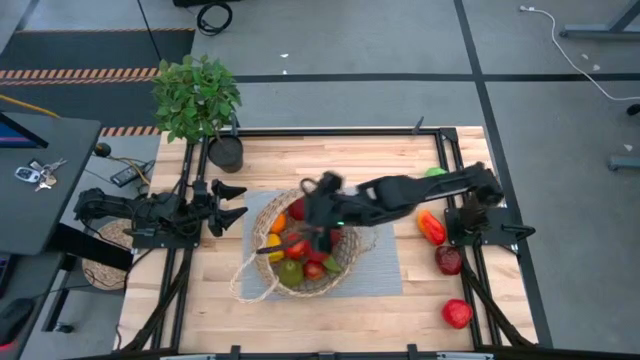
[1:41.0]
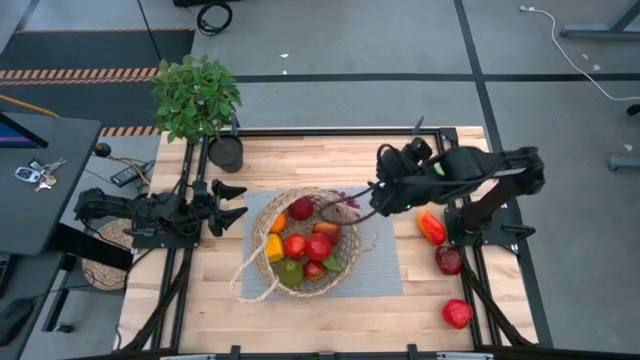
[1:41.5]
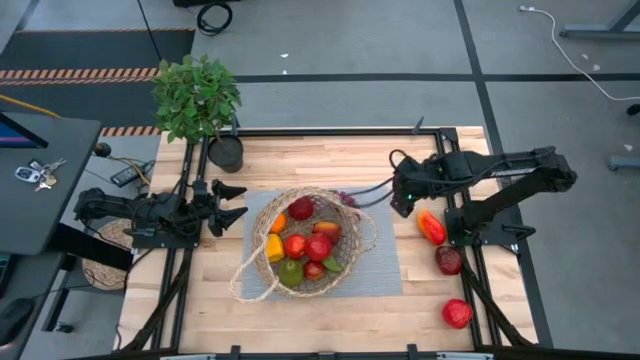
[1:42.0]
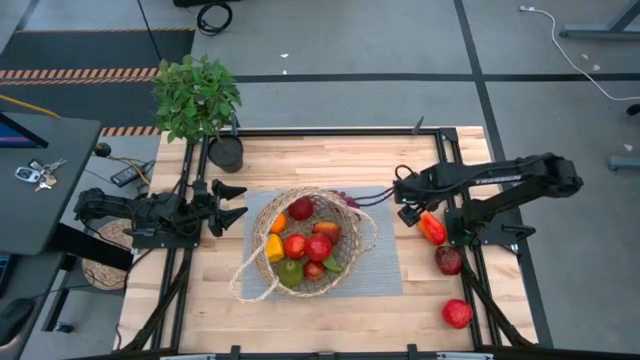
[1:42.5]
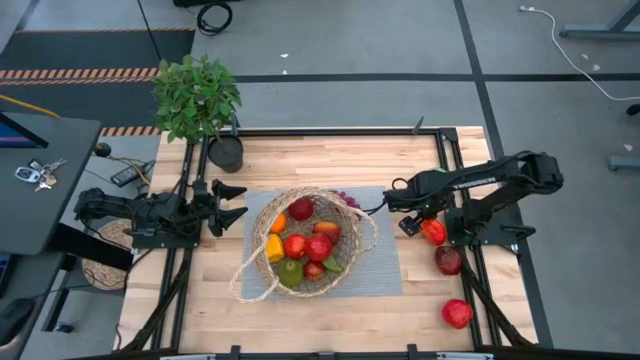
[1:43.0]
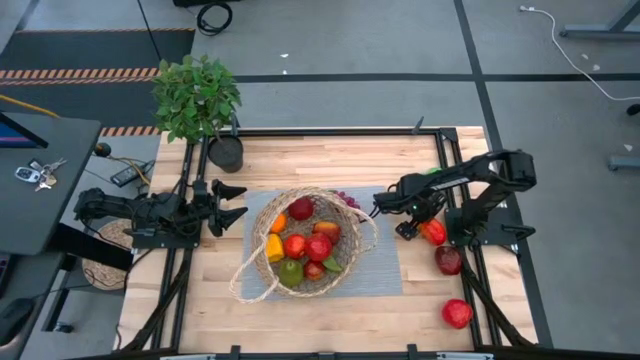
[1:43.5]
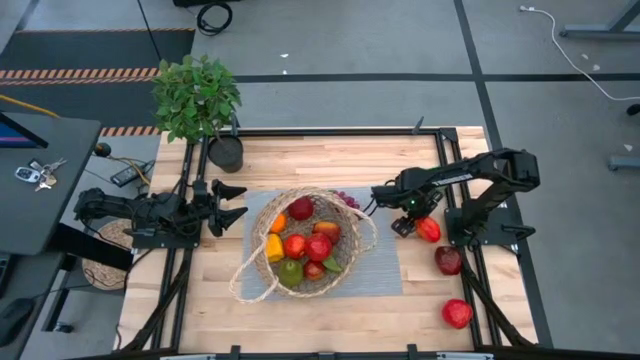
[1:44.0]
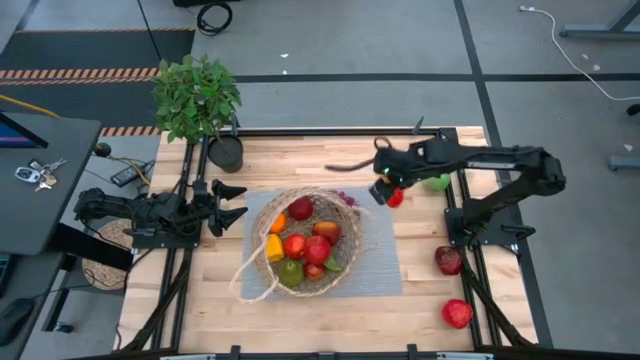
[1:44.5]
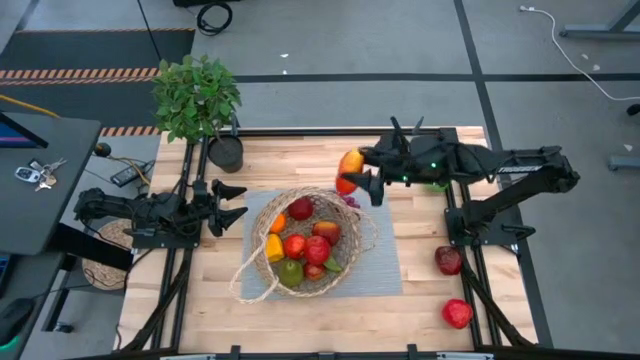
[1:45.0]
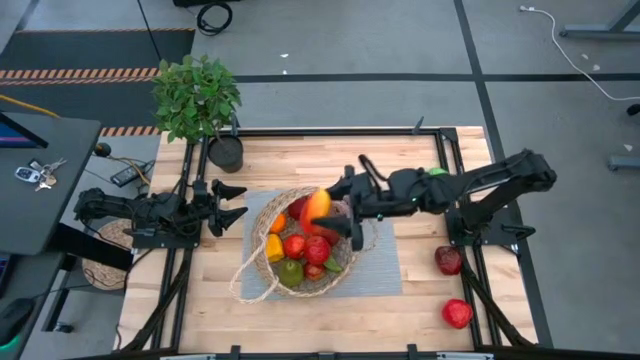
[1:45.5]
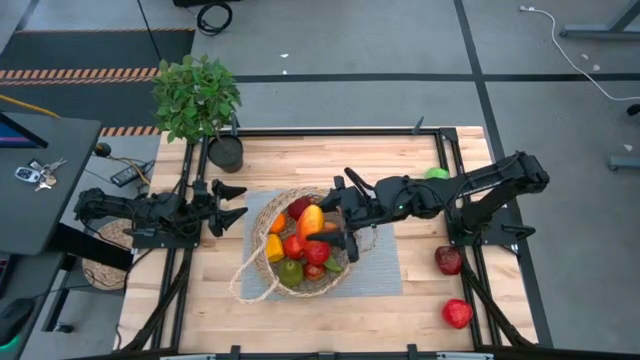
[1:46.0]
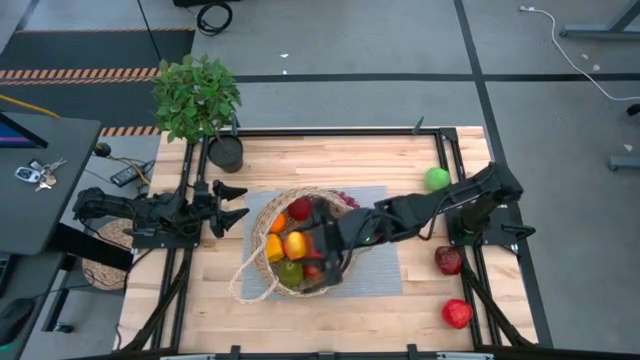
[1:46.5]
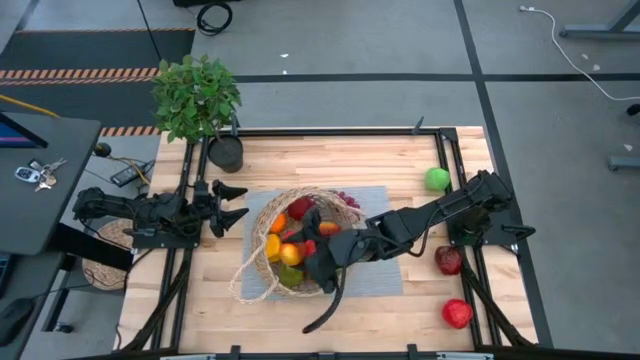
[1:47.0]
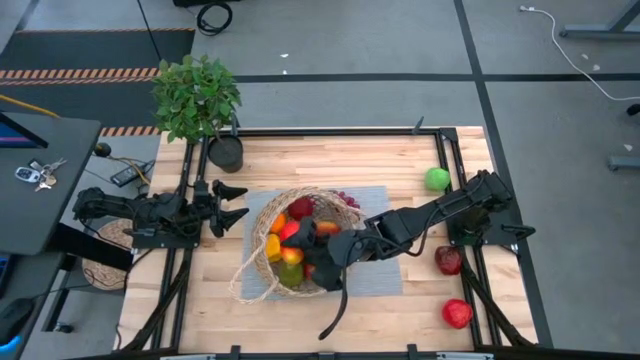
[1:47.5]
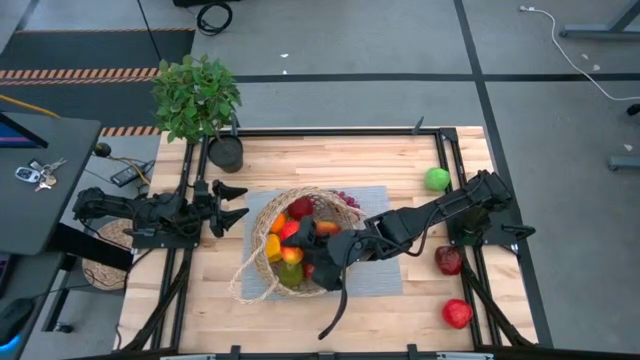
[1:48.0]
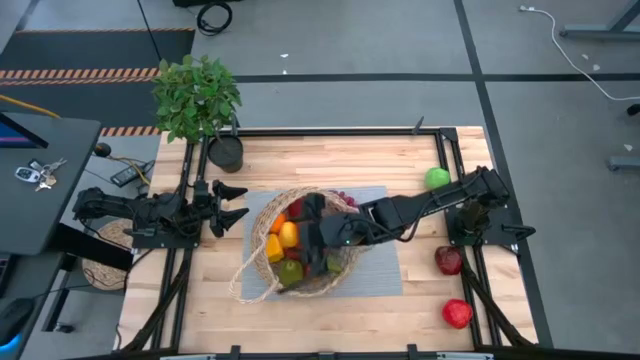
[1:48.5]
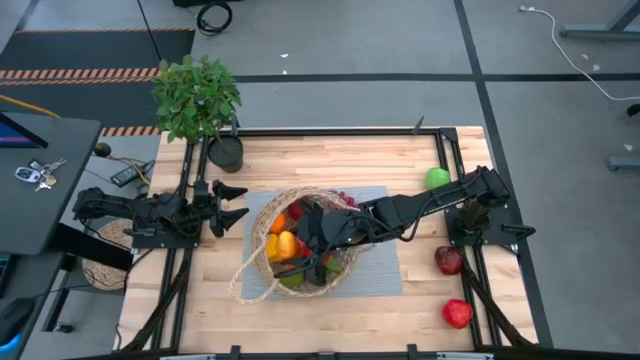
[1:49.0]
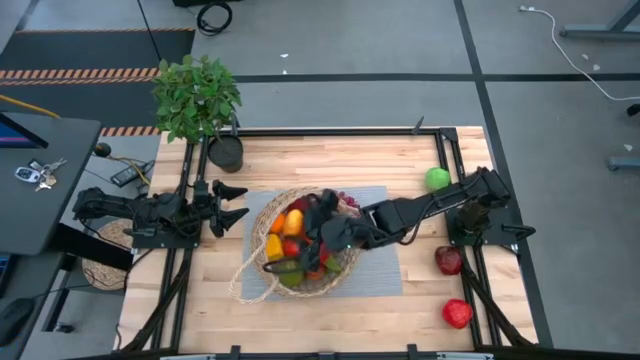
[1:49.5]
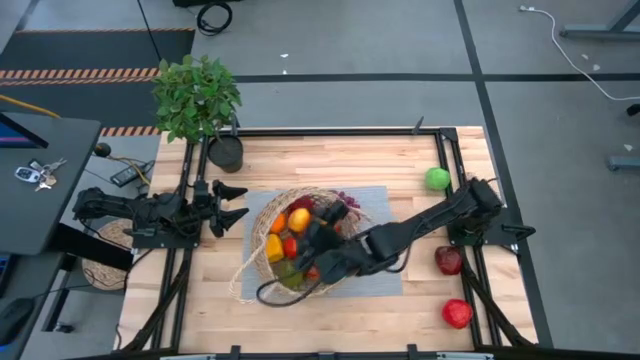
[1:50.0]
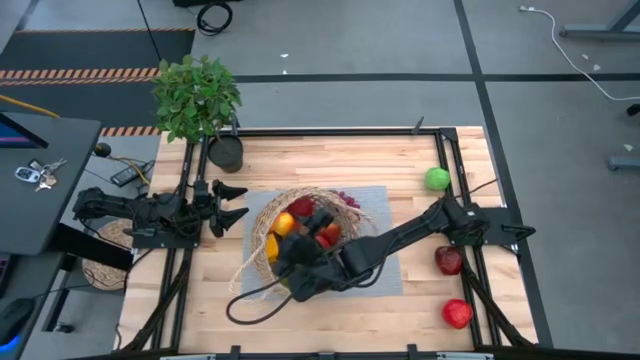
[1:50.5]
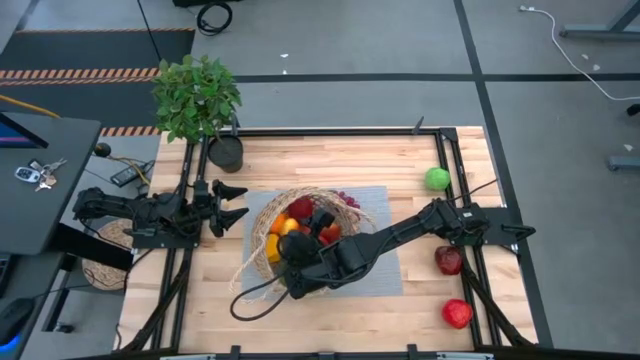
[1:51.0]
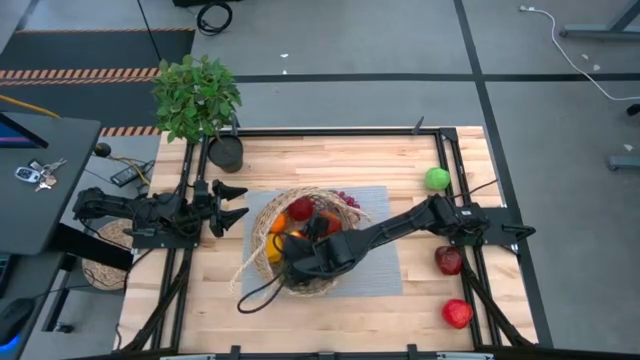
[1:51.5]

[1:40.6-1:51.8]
Task: Build produce basket
Put the red mango into the brown basket

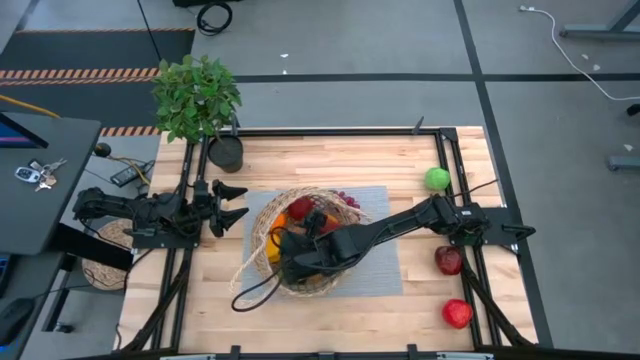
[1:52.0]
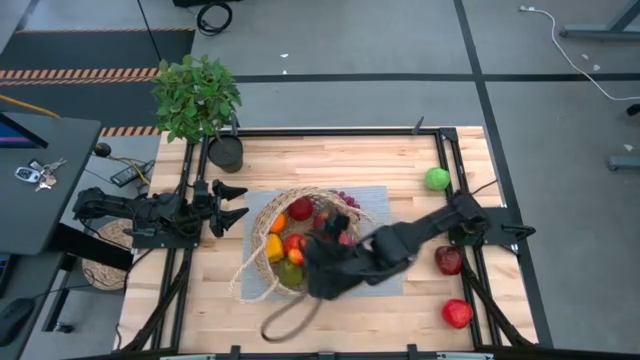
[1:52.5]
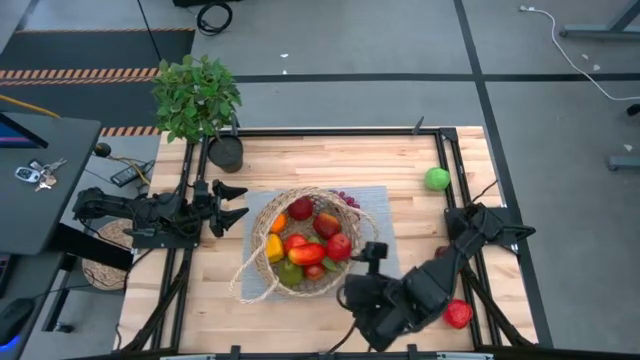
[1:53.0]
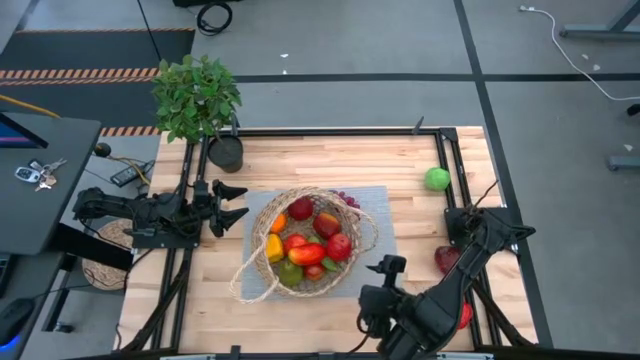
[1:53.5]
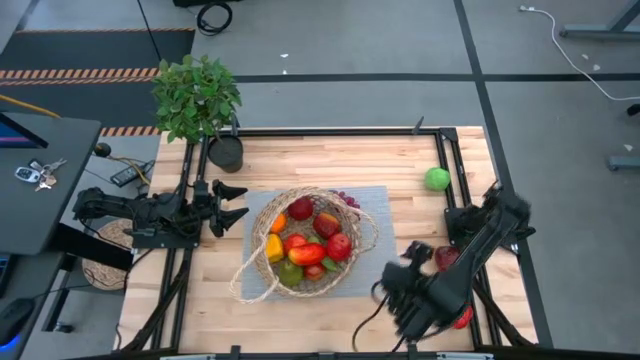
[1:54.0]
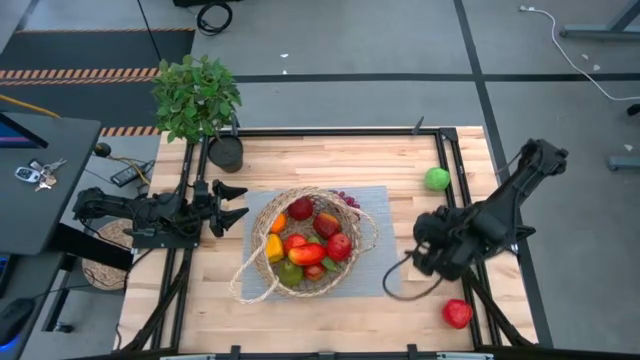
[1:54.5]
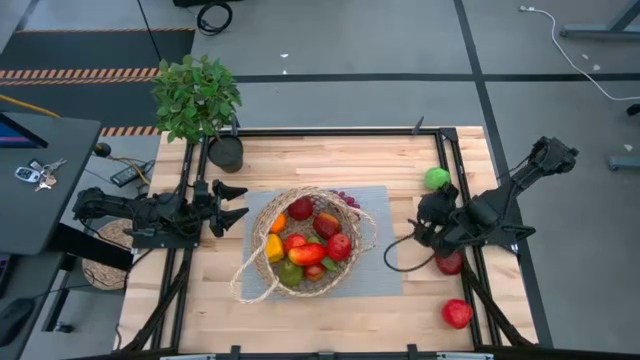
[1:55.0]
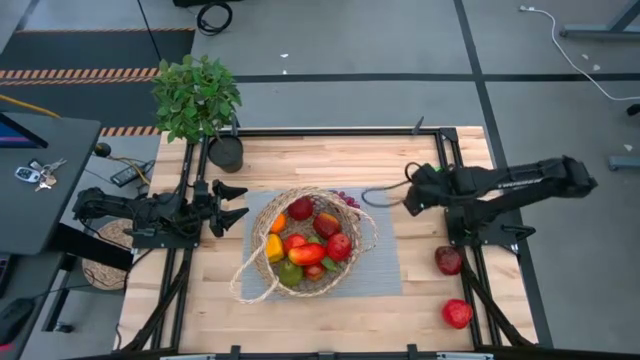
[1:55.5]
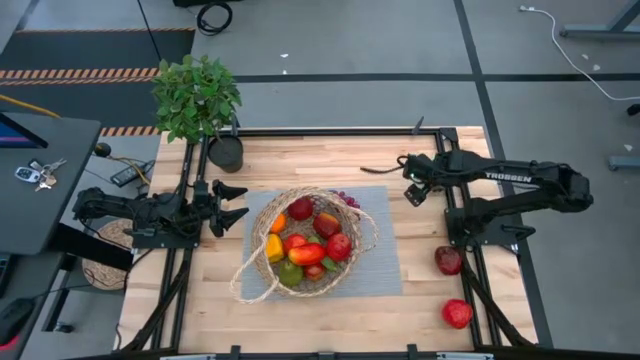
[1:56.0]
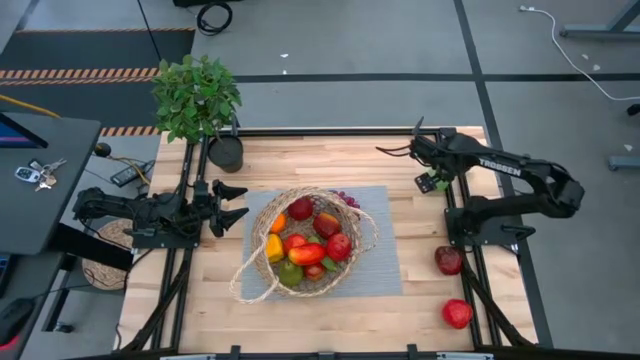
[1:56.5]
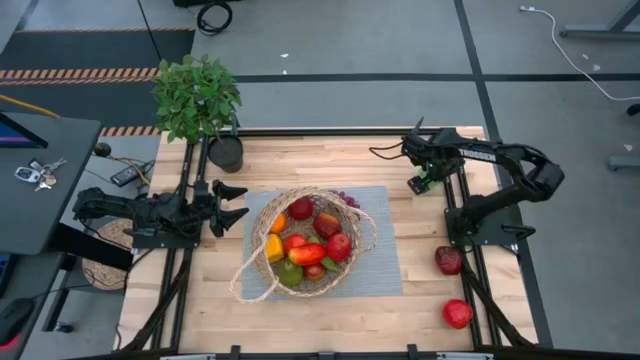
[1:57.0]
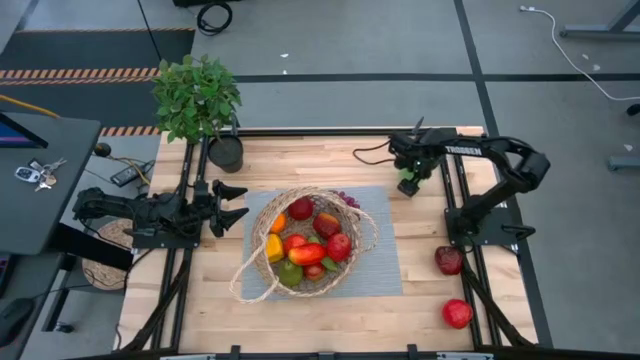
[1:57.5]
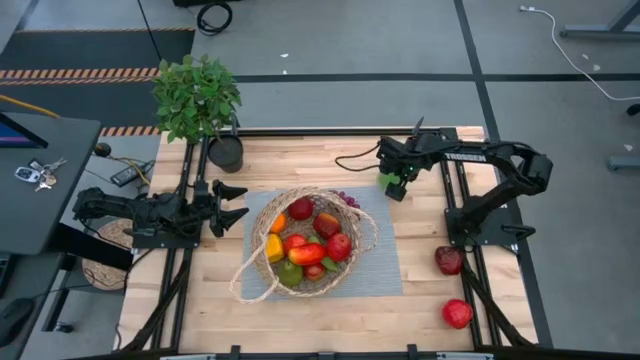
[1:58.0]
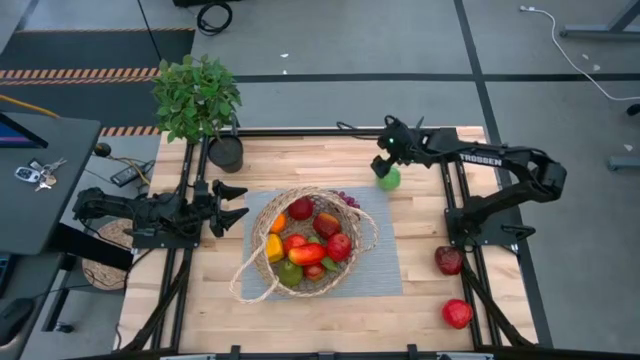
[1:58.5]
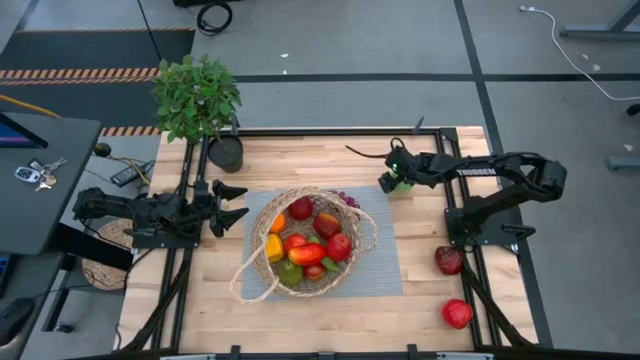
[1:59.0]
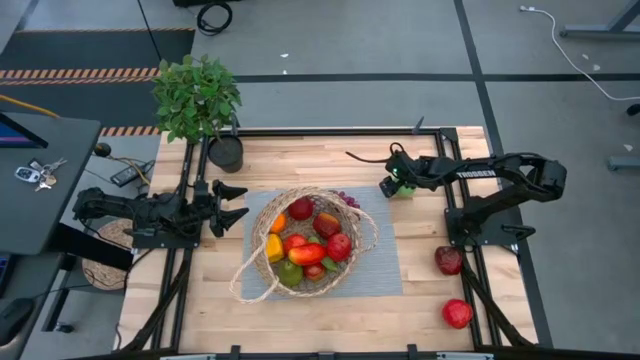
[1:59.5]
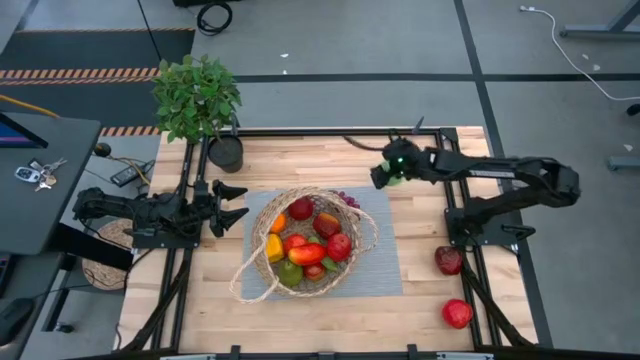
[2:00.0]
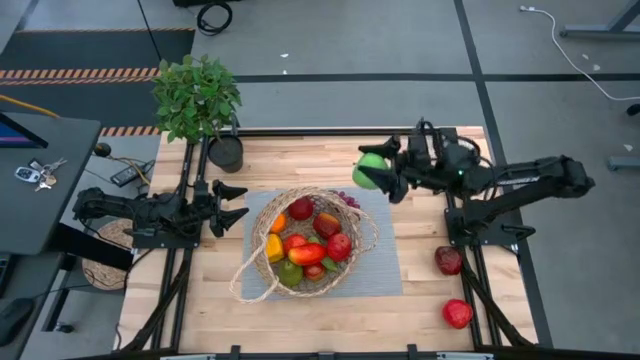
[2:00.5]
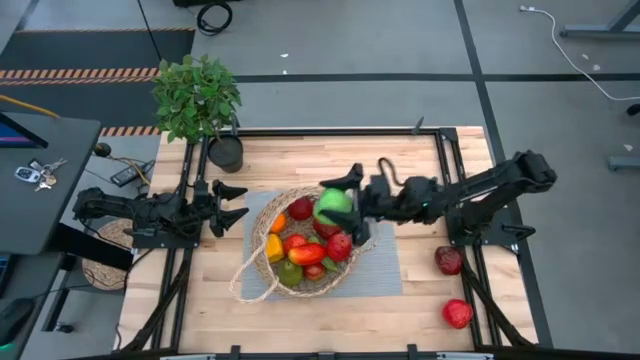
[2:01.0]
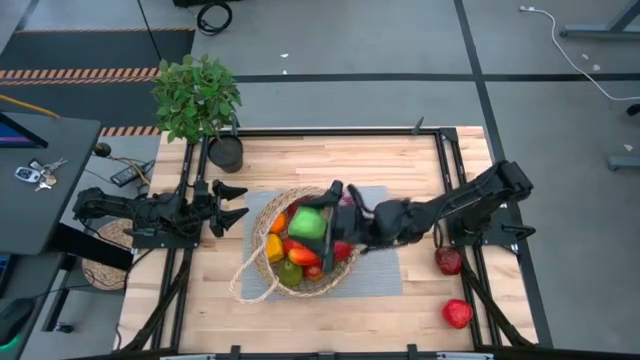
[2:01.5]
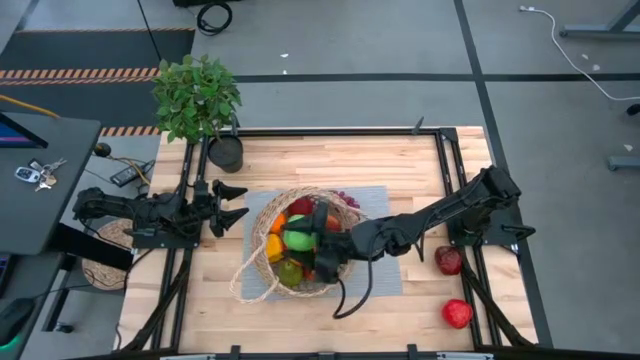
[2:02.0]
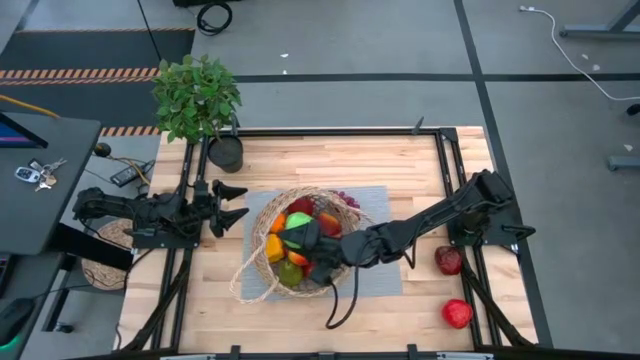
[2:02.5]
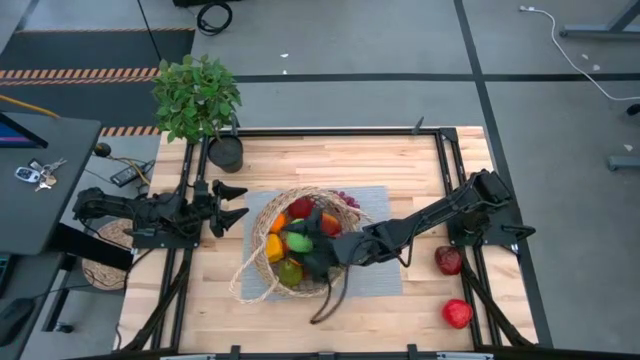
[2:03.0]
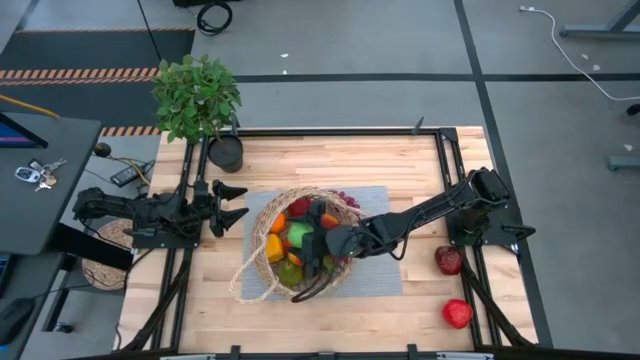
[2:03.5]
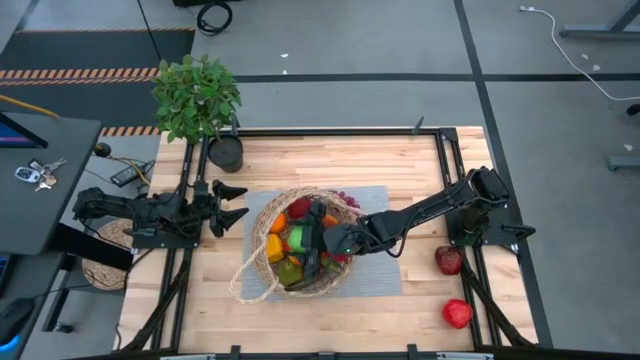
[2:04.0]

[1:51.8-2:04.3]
Put the green apple into the brown basket
